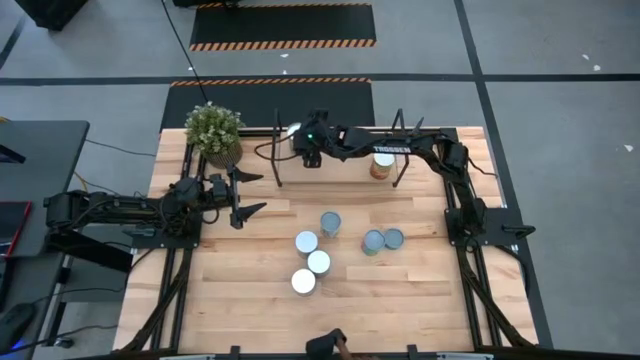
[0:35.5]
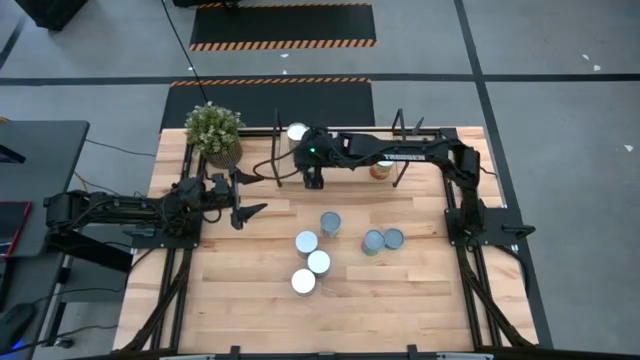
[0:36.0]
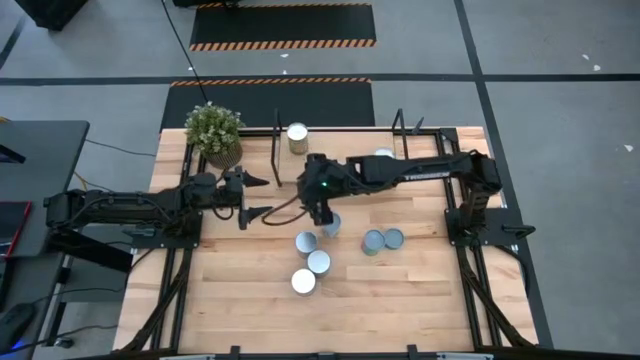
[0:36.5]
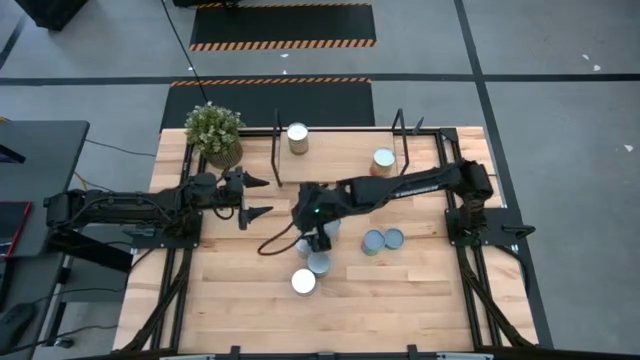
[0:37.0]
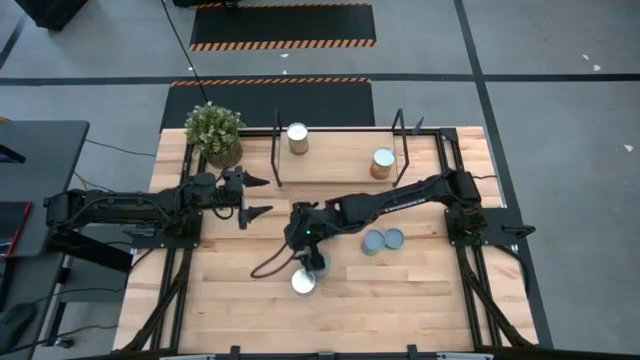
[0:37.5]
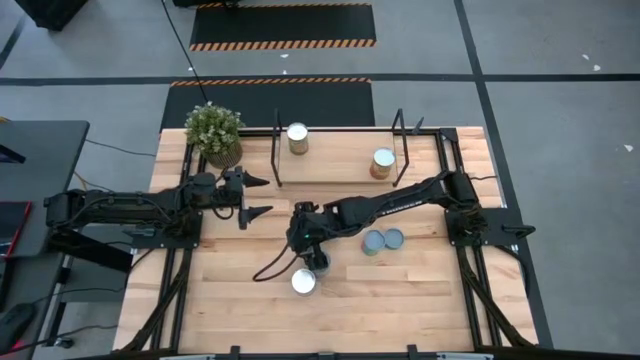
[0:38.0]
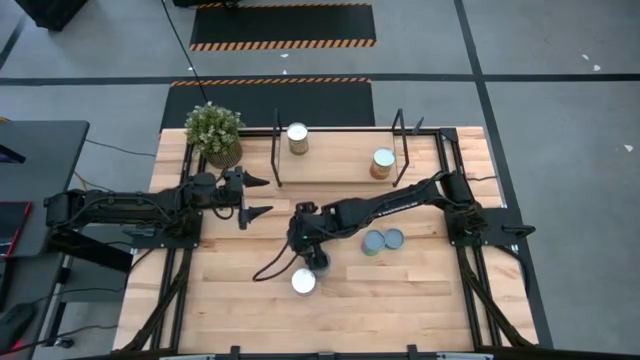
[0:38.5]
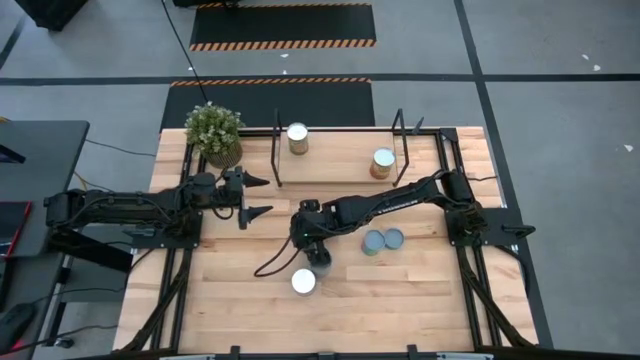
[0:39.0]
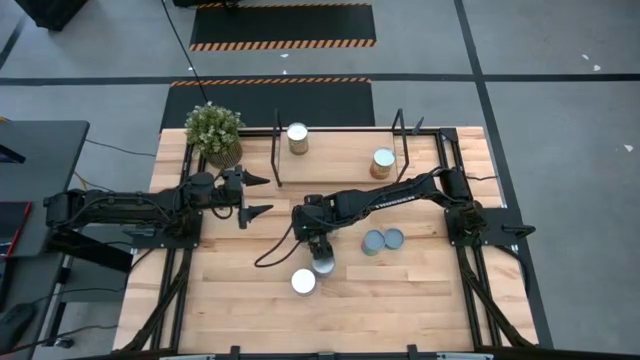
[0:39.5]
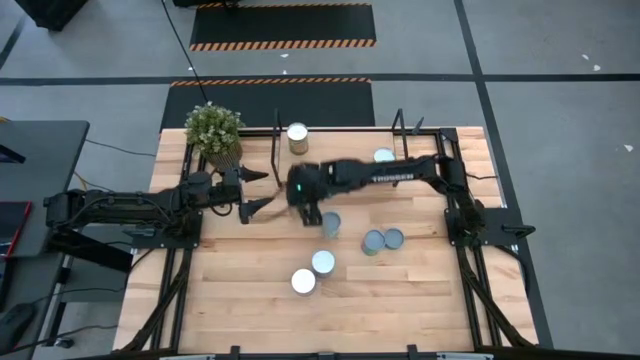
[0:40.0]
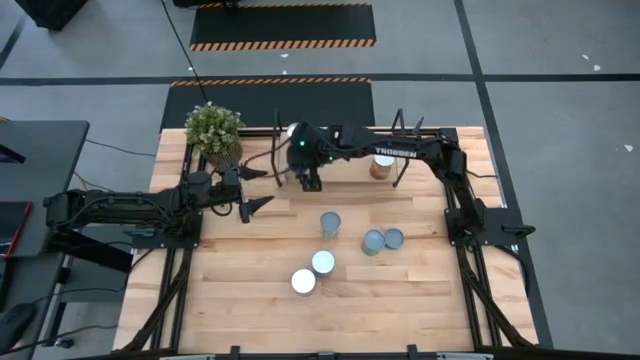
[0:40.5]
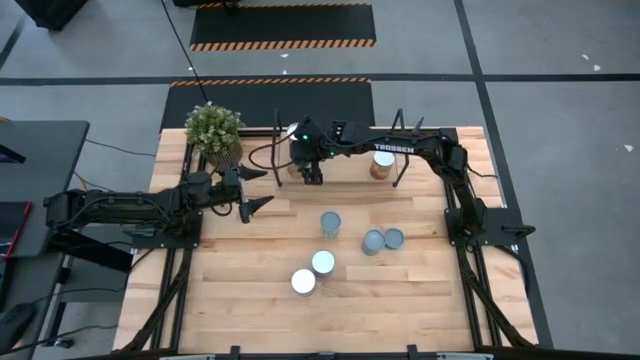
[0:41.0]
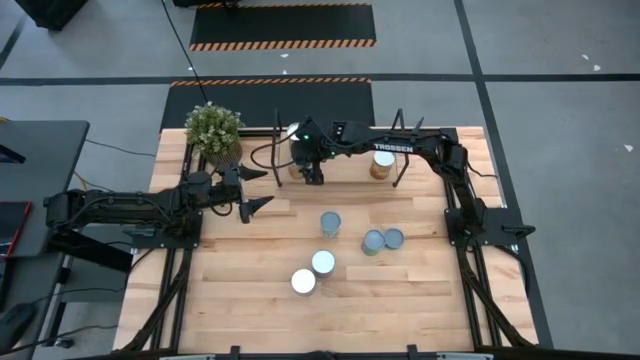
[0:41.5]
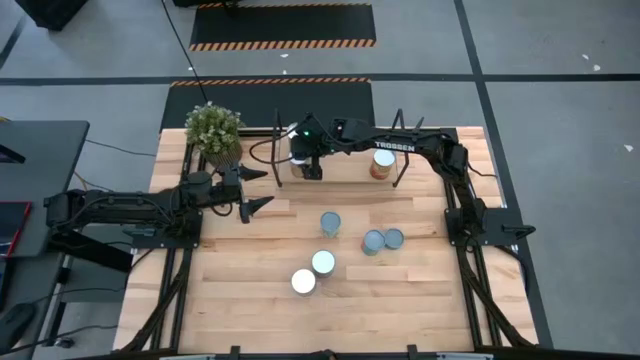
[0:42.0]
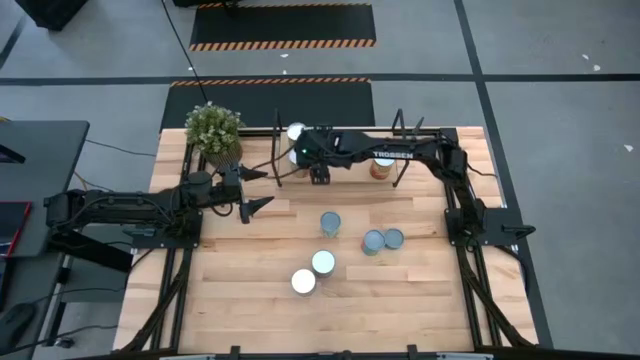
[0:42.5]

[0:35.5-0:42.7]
Task: Pick and place cans onto a shelf
Put the canned pineapples on the shelf

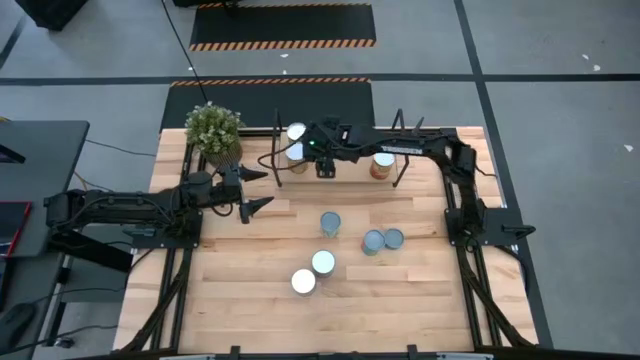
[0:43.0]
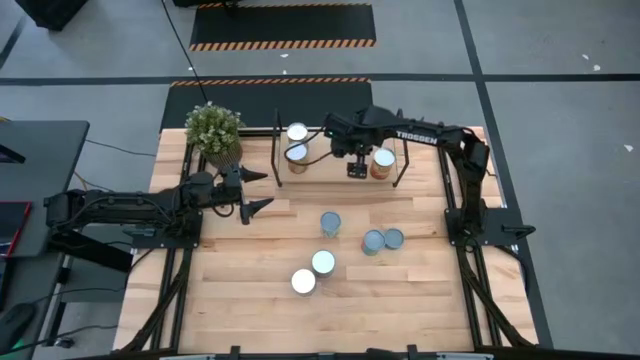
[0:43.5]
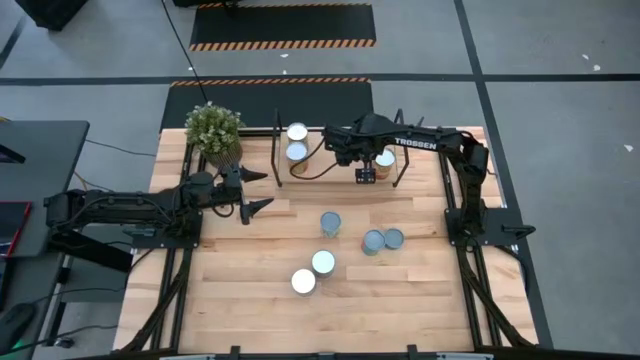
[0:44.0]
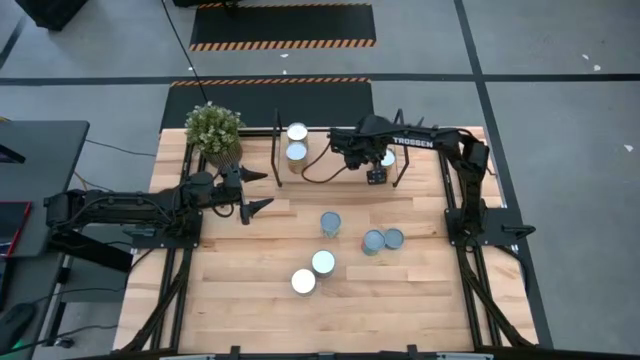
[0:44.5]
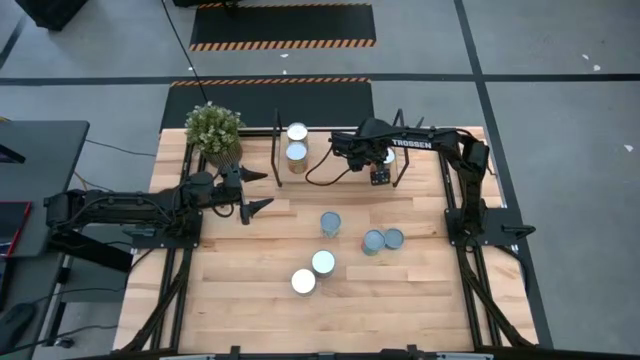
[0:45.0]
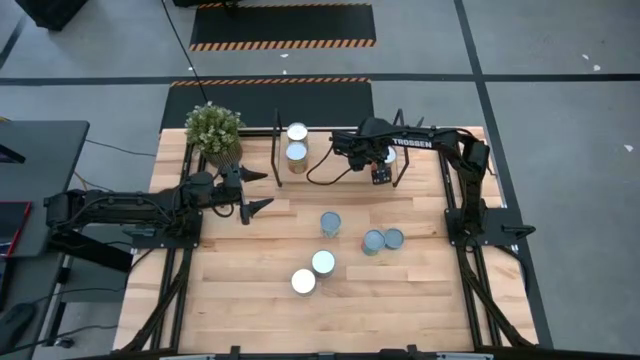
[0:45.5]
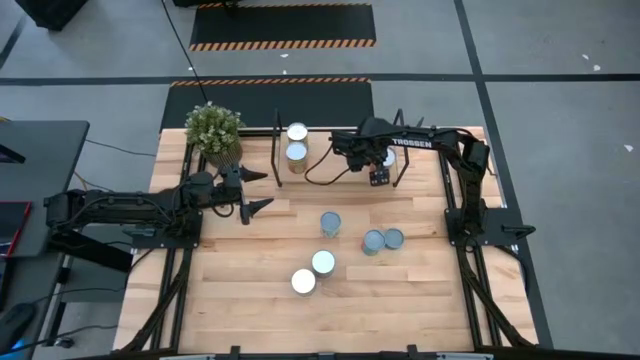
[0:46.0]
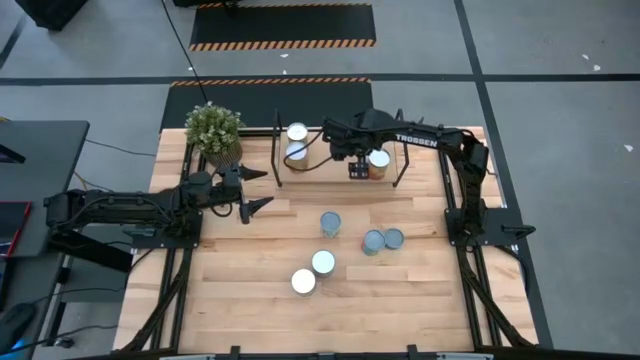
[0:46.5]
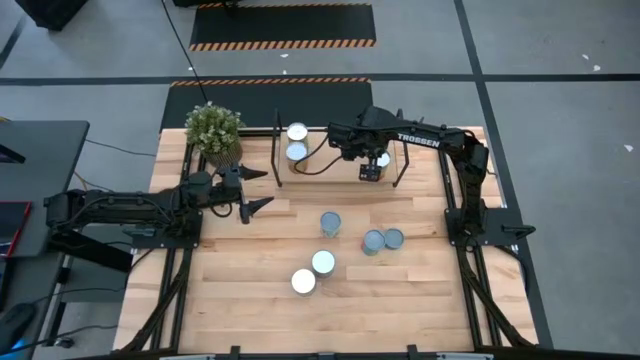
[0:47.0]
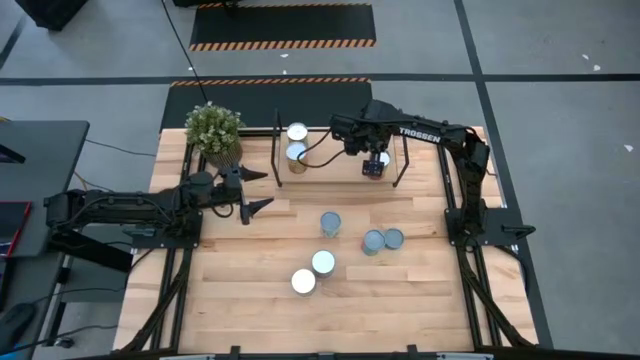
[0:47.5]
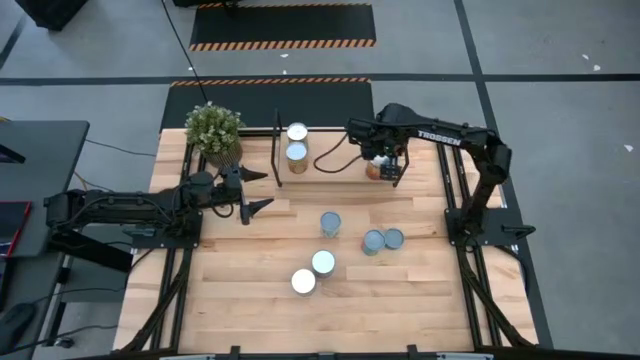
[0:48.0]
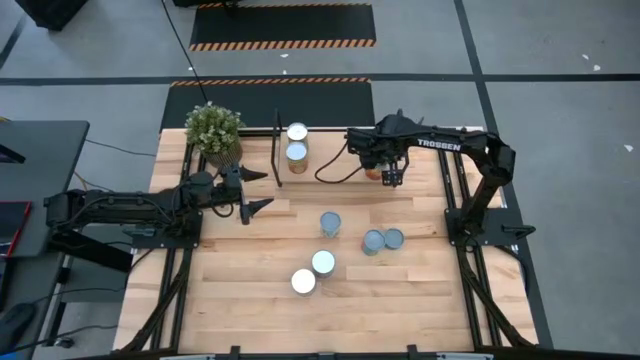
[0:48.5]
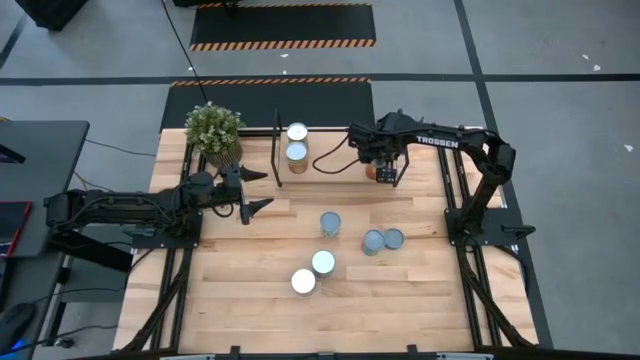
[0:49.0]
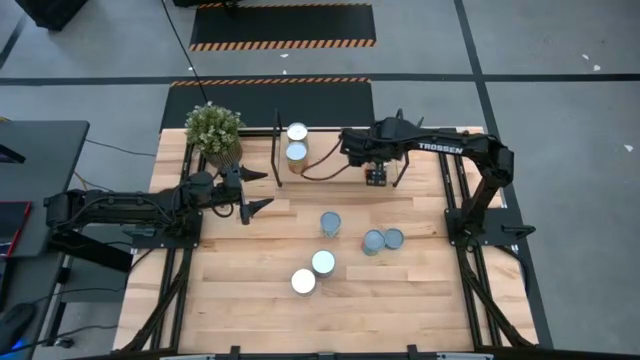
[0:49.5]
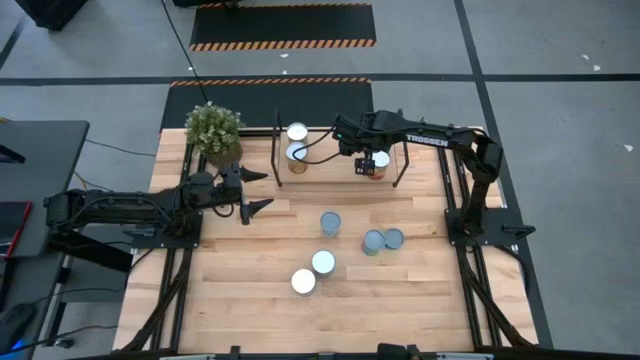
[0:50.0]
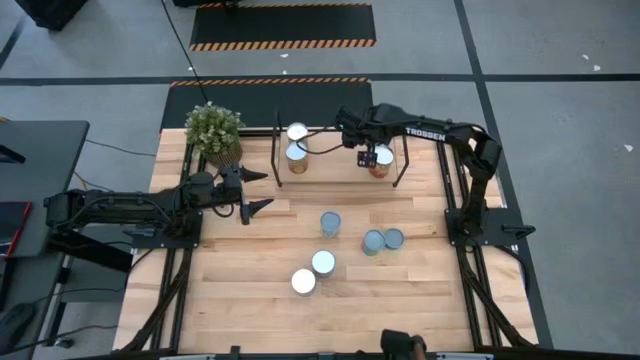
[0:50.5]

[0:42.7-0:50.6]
Adjust the canned corn on the shelf

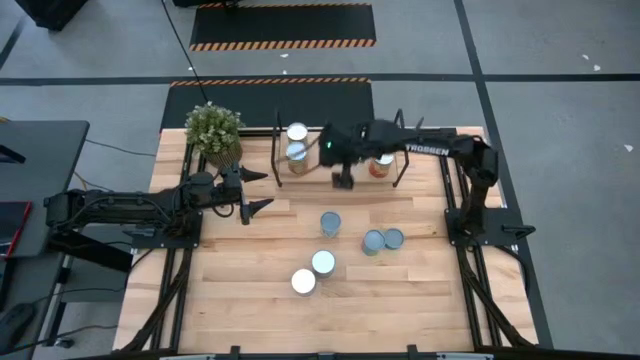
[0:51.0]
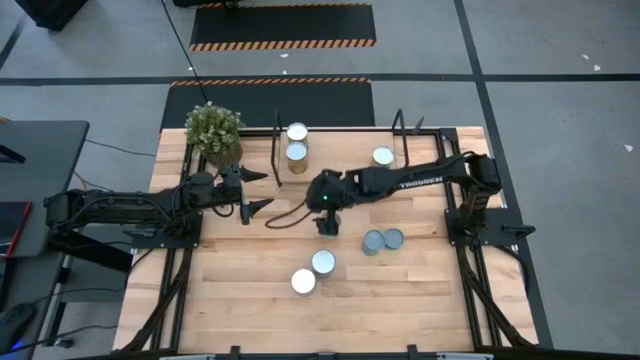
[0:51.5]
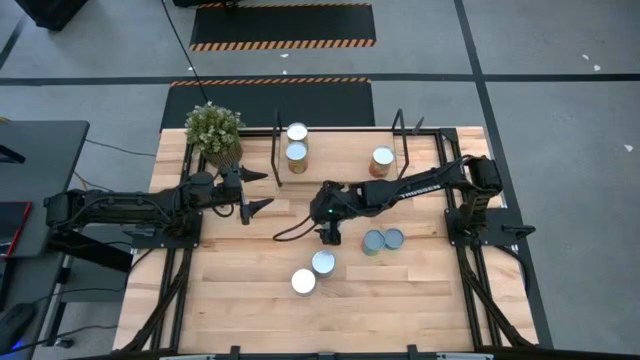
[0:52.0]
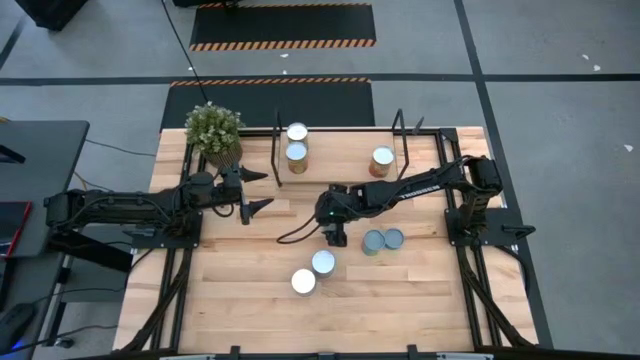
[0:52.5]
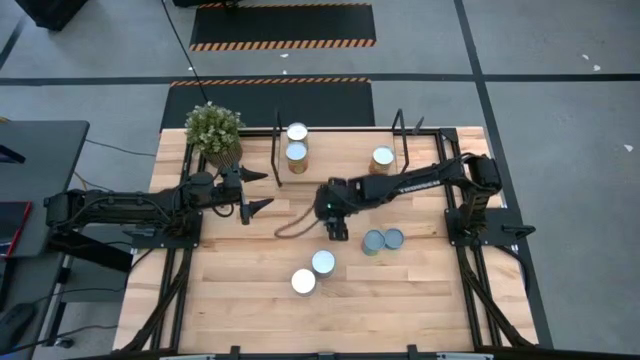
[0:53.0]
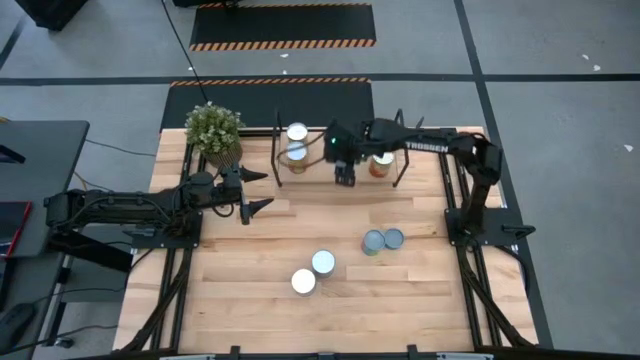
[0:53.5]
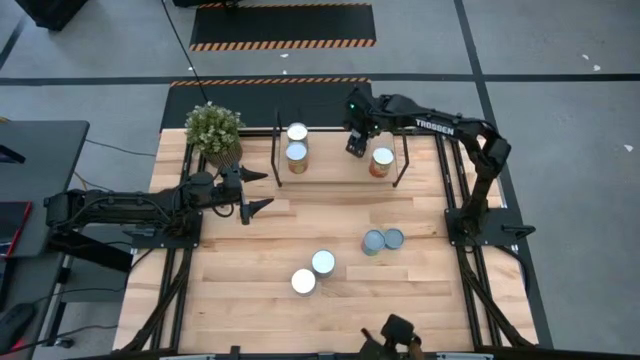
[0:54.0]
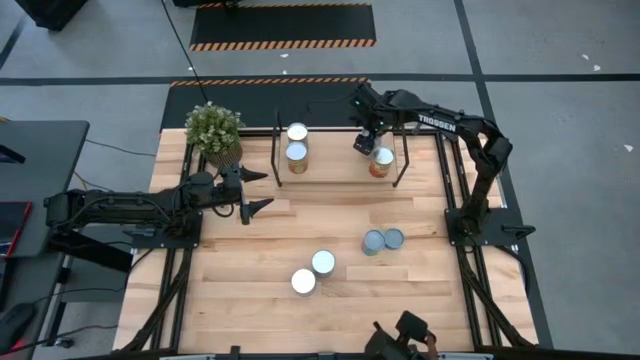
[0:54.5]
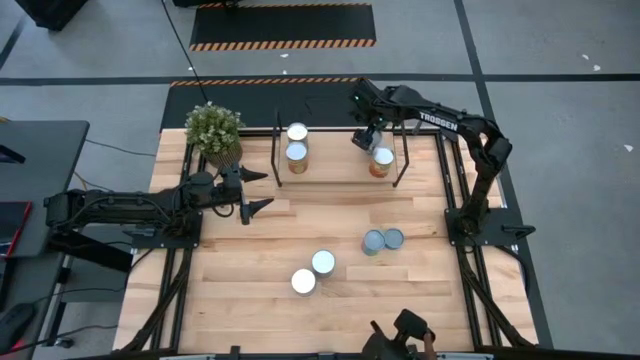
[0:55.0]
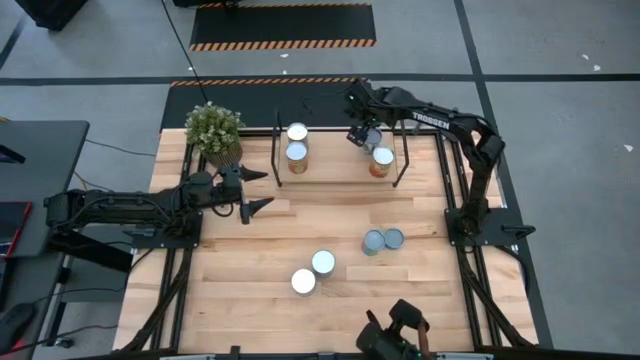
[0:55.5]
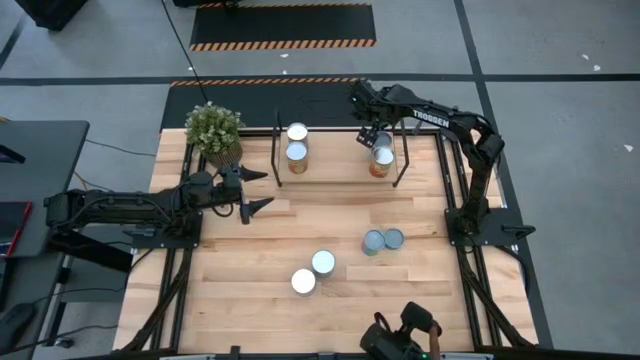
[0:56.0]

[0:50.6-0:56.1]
Put the canned mixed fruits on the shelf
